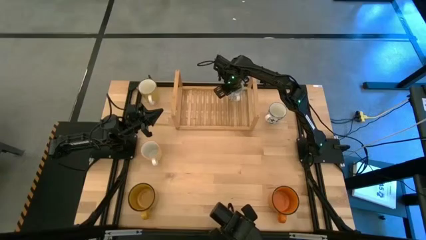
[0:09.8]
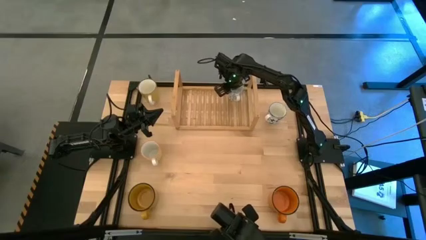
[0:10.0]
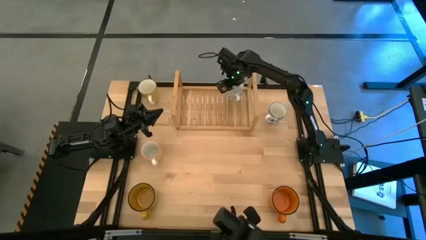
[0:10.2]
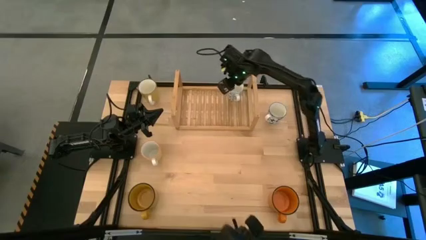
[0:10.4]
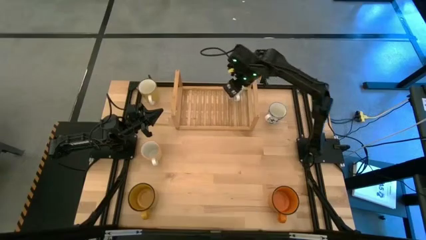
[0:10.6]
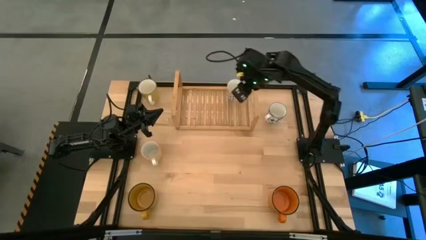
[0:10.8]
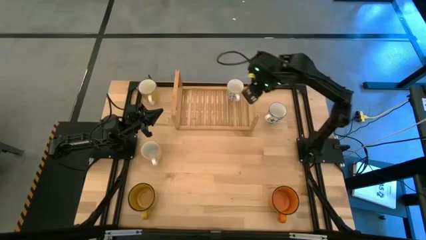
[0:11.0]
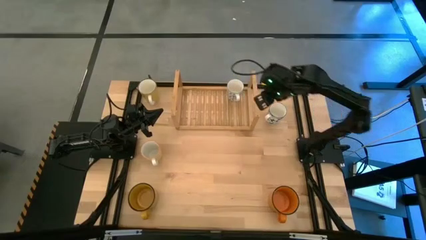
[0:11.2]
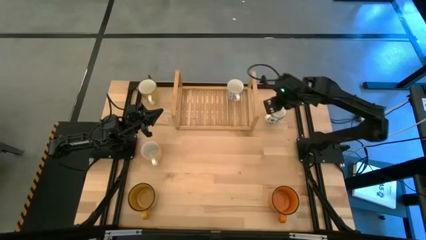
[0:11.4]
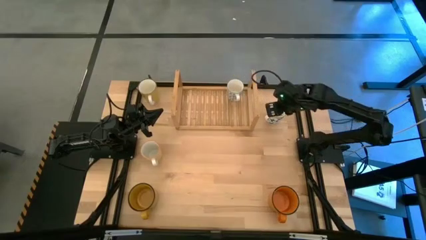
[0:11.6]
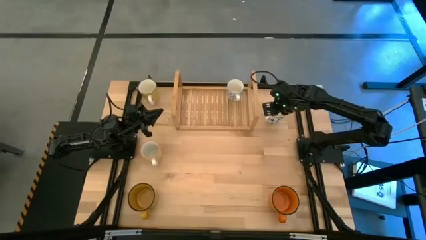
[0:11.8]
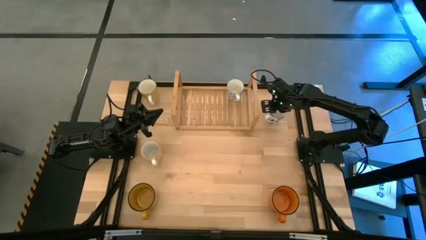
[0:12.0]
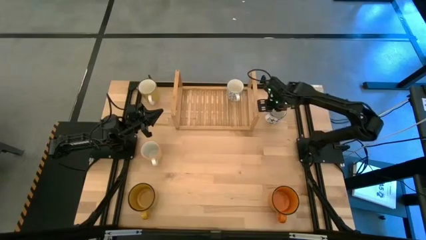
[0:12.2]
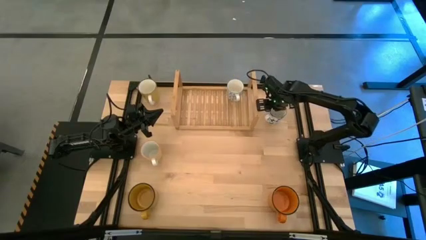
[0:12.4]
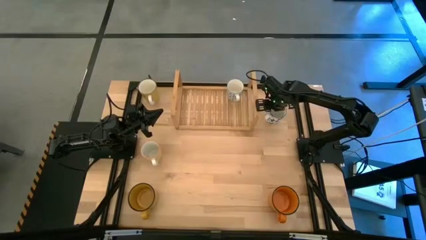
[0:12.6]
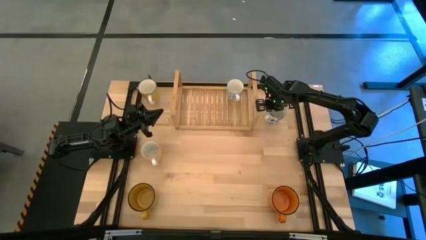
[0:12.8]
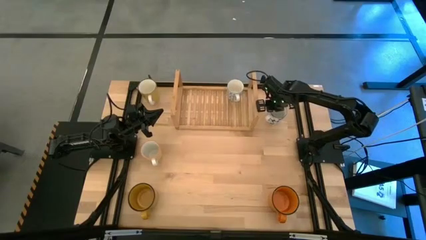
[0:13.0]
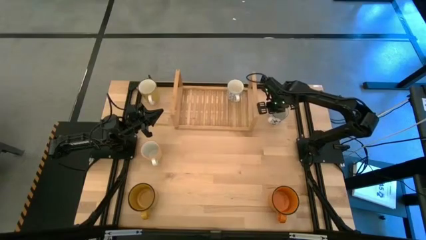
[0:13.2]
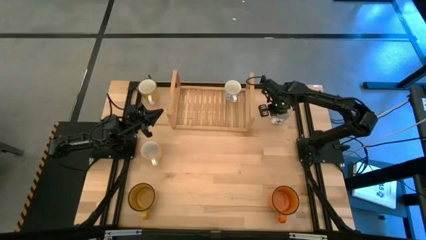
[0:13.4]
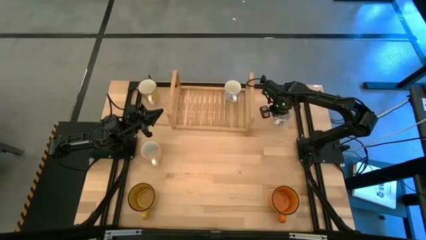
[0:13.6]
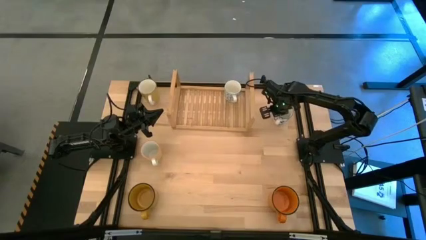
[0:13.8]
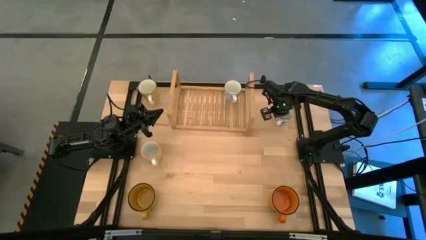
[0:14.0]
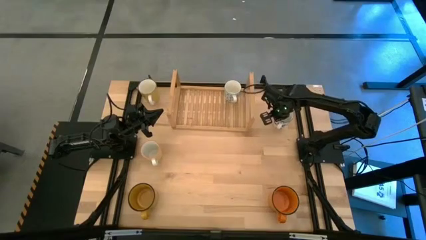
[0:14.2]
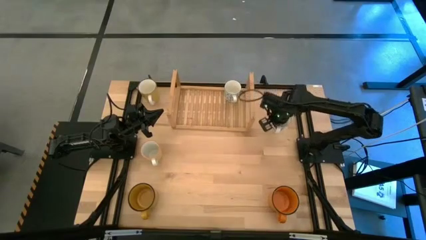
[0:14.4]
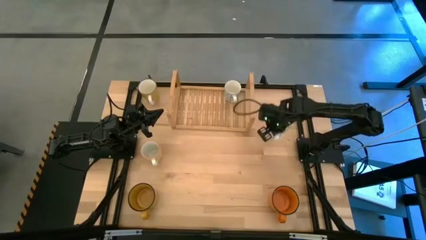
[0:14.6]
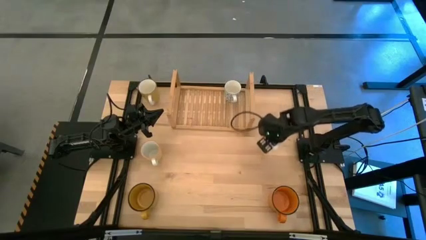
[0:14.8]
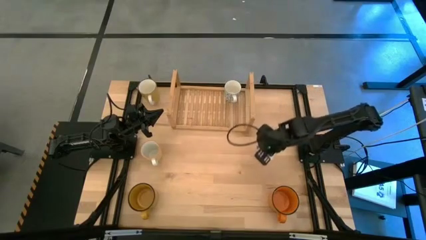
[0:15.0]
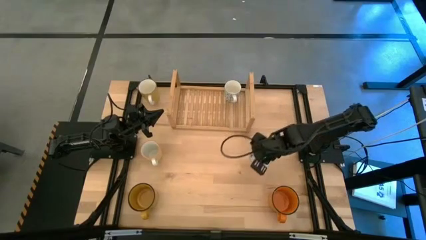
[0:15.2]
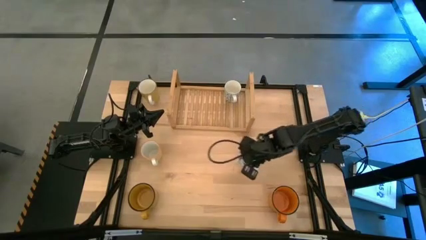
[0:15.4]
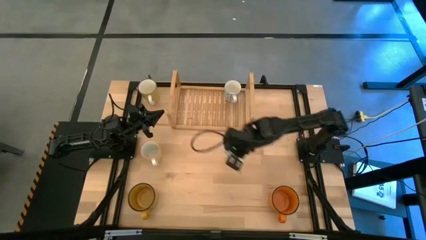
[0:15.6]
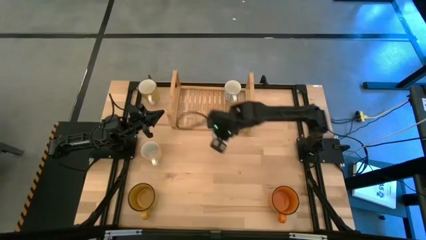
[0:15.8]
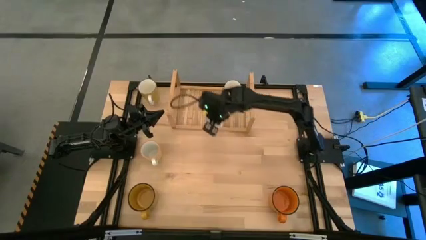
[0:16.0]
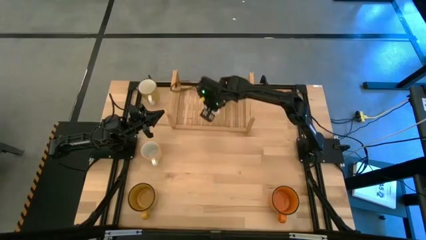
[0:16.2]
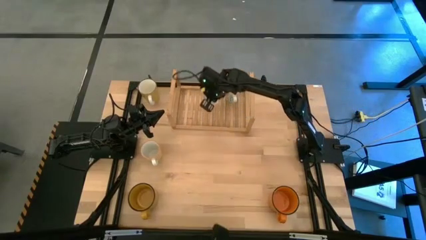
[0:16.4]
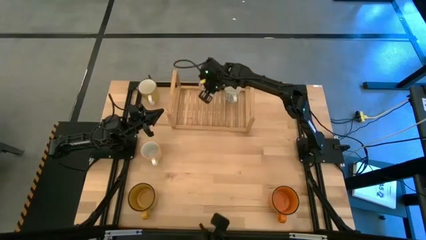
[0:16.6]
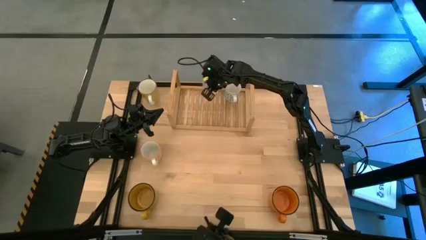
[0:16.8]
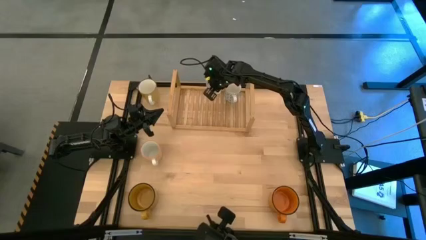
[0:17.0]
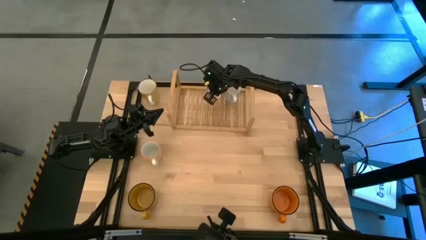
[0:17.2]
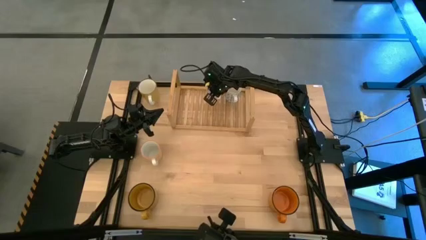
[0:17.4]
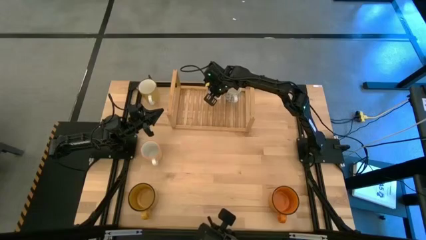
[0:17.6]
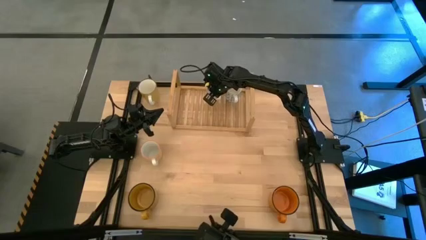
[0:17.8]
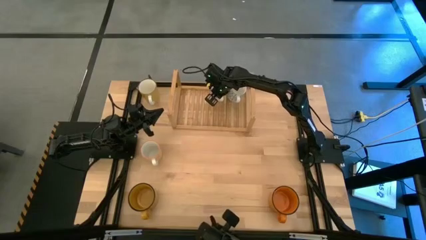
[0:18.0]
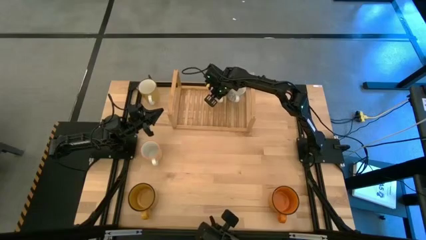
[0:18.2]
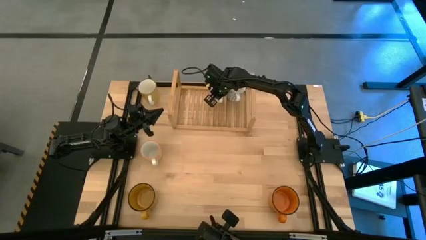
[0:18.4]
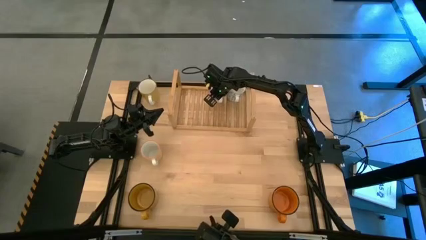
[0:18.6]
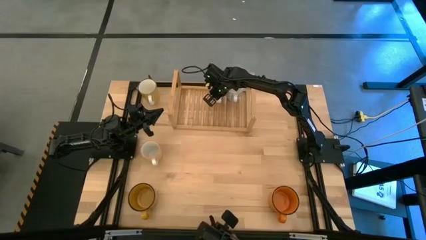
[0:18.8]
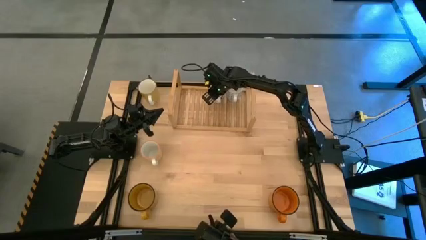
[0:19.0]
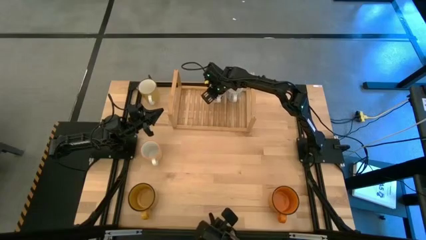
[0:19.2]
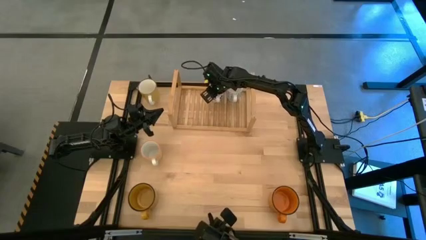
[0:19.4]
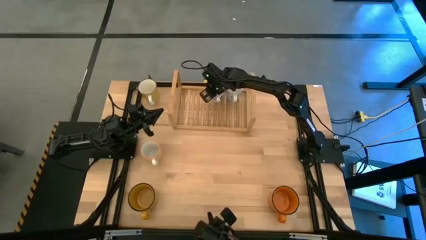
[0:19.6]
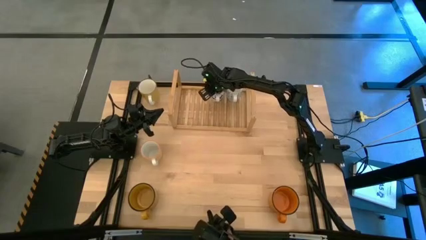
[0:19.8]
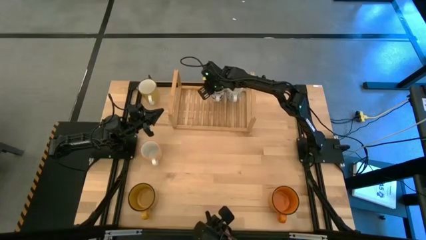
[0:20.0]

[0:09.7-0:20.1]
Task: Place coffee mugs
Put the blue mug on the shelf

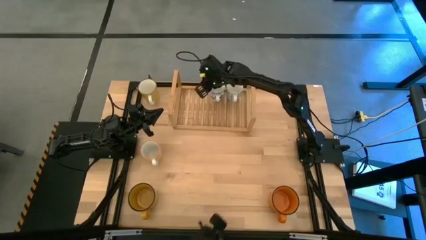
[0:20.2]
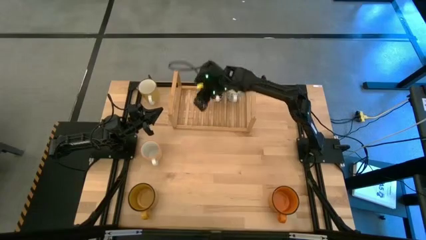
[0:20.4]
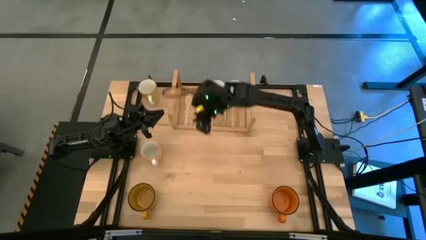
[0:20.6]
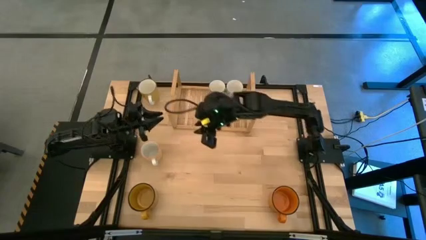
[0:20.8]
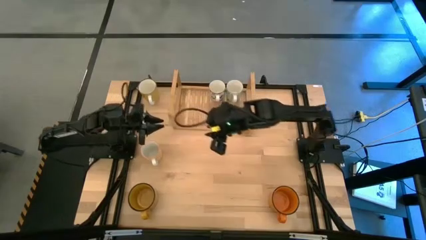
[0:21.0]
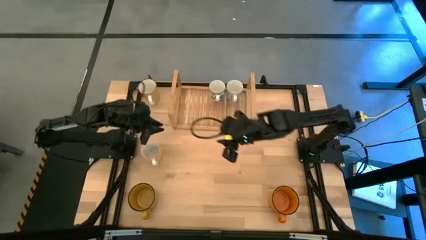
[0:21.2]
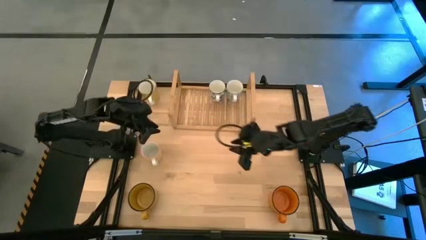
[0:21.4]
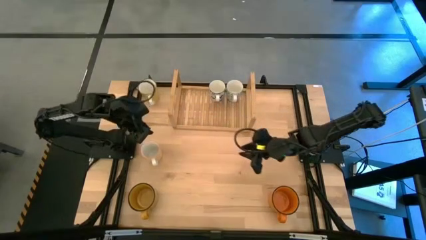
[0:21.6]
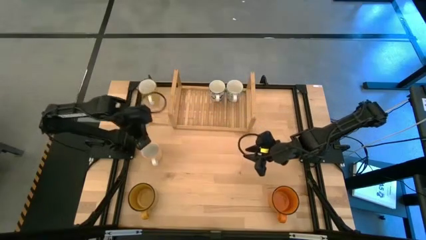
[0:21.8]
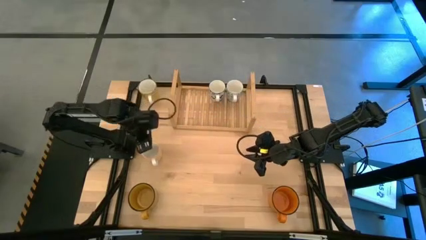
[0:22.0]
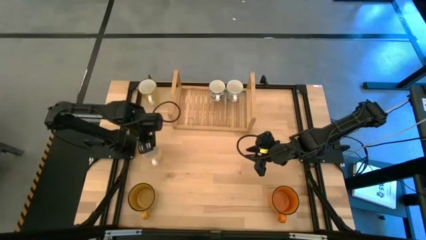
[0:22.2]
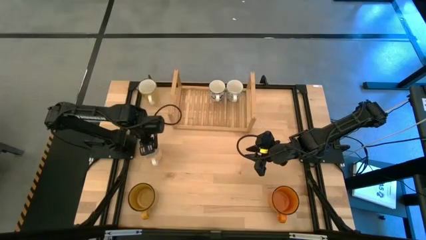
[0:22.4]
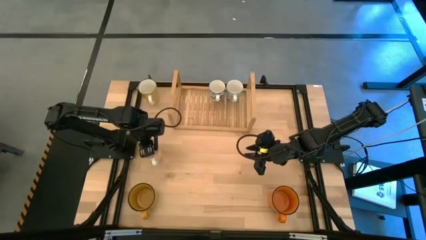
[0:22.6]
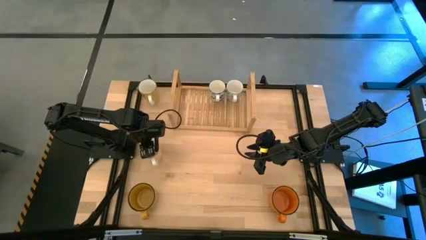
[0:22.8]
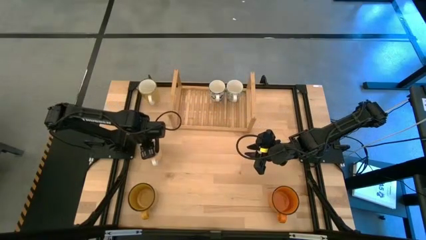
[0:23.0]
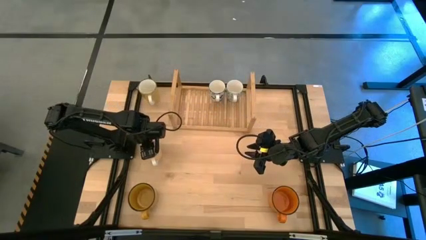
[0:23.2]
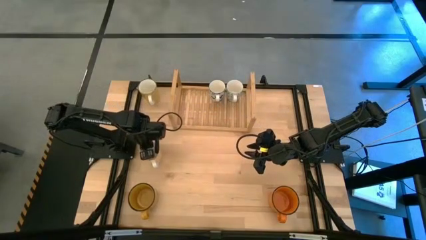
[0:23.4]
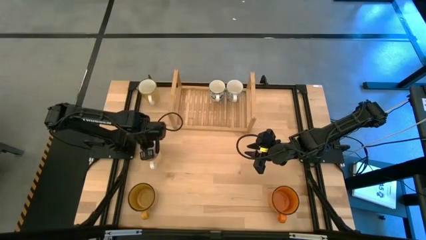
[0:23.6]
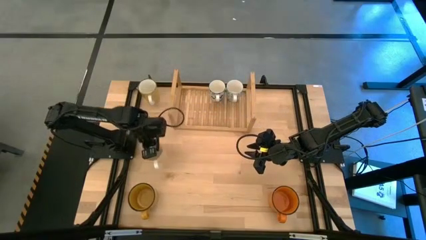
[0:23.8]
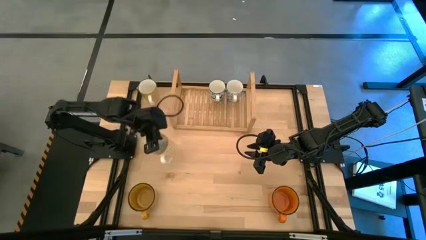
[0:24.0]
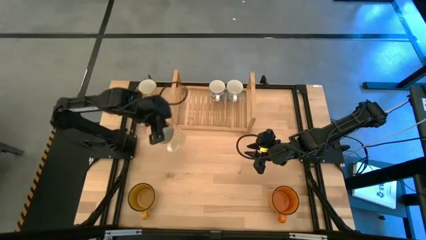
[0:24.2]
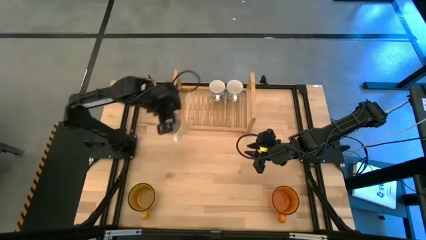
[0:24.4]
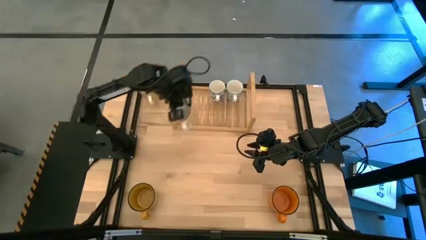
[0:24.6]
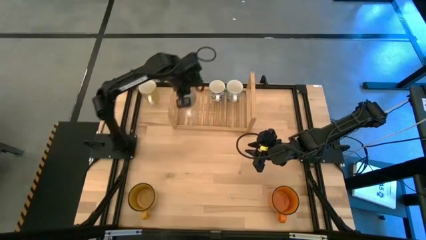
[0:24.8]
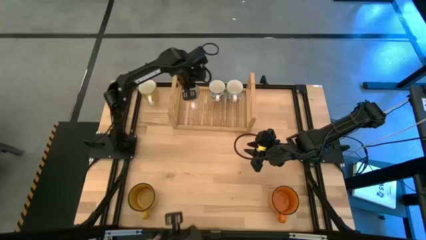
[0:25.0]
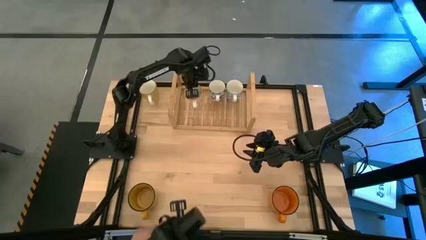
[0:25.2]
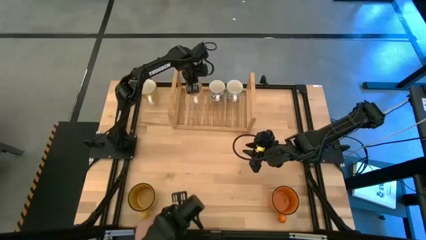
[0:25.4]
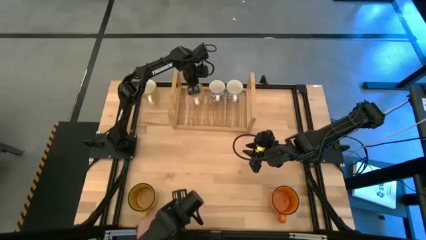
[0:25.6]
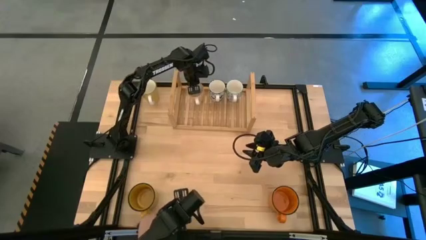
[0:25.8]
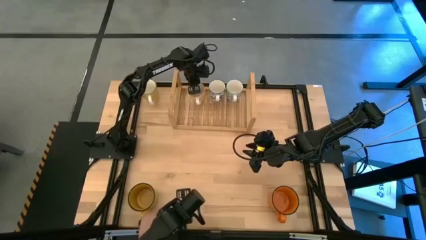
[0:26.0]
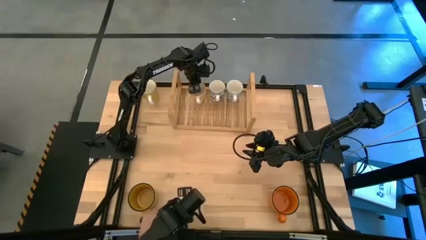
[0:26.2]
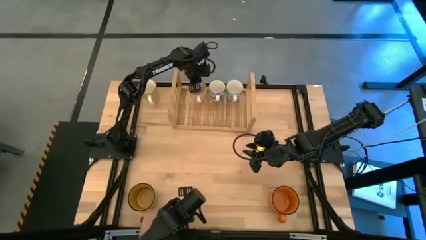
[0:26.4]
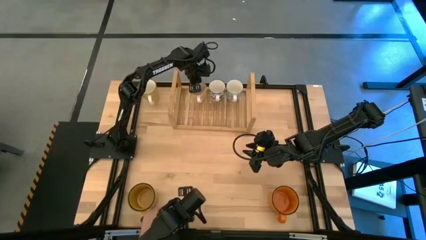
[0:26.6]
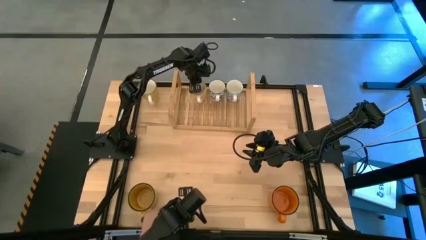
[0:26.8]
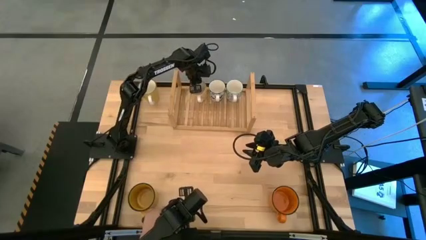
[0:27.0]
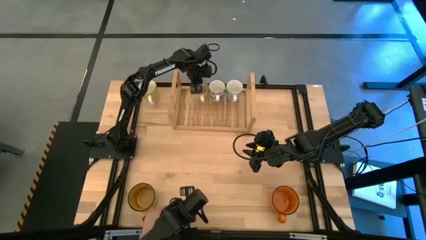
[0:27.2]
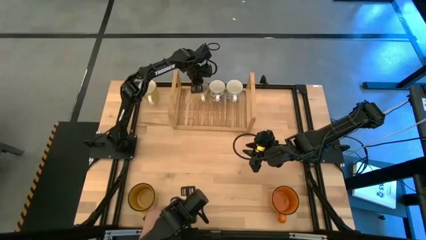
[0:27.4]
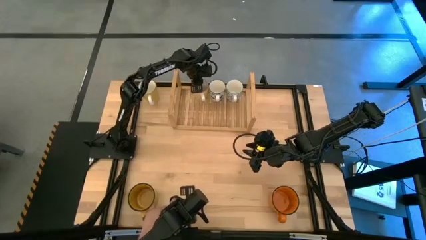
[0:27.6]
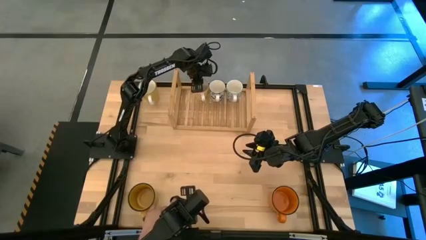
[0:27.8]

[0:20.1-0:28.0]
Put the yellow patterned mug on the shelf
